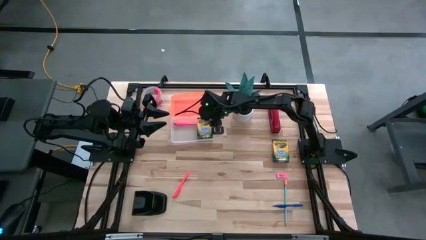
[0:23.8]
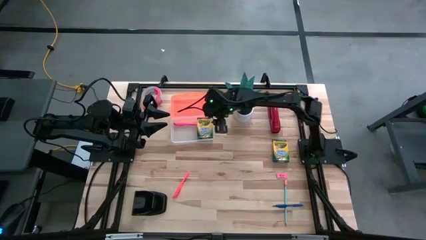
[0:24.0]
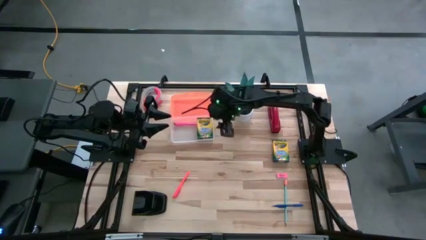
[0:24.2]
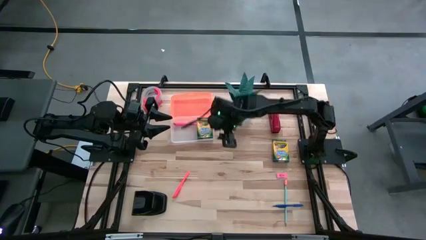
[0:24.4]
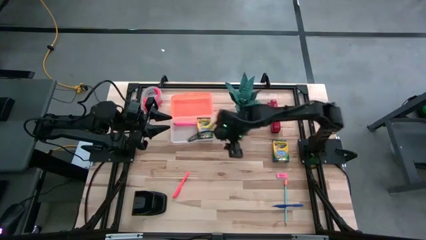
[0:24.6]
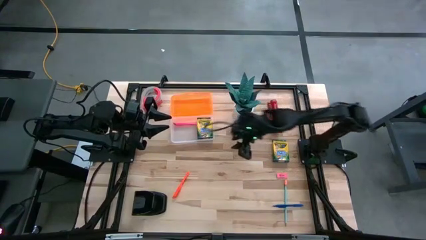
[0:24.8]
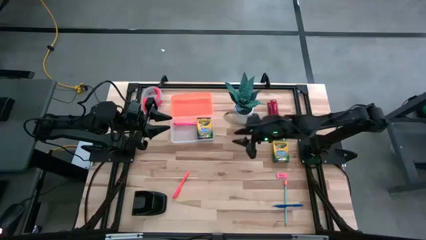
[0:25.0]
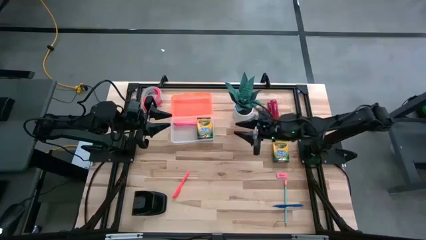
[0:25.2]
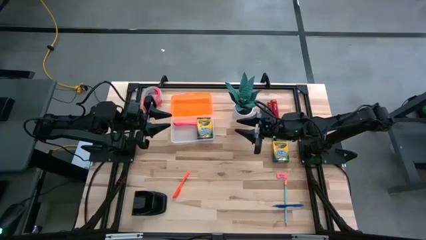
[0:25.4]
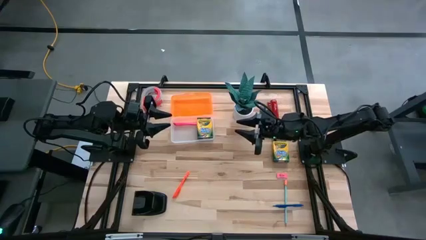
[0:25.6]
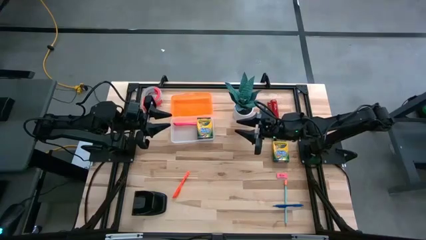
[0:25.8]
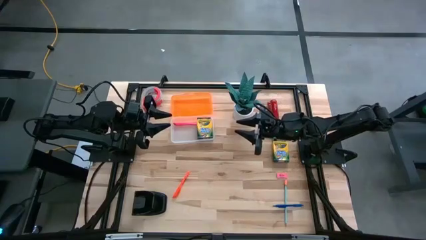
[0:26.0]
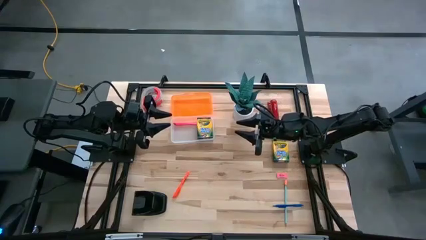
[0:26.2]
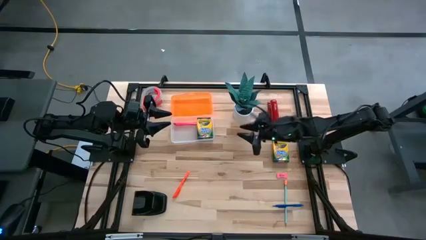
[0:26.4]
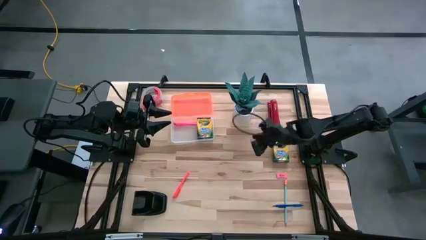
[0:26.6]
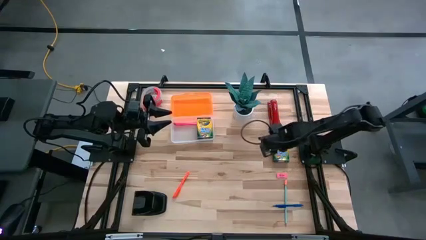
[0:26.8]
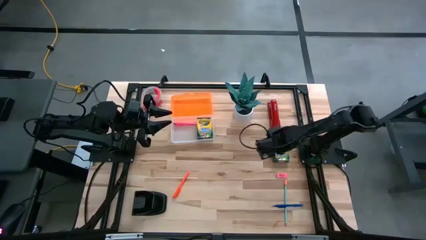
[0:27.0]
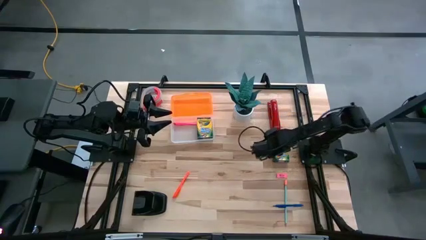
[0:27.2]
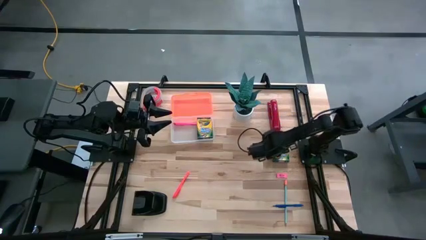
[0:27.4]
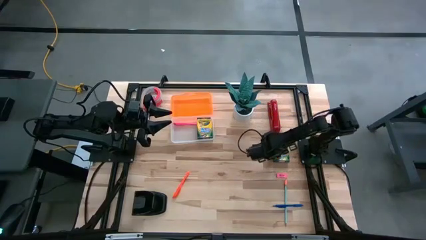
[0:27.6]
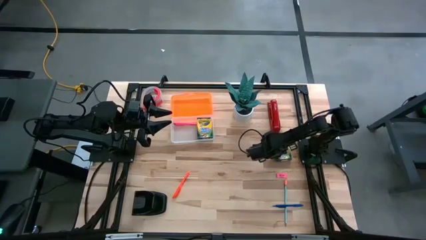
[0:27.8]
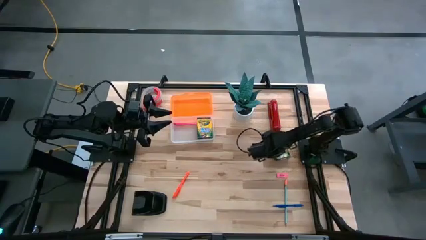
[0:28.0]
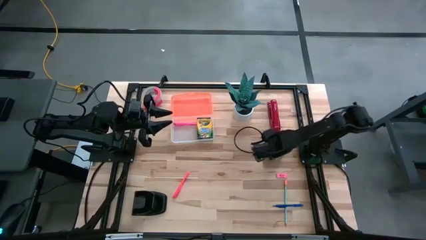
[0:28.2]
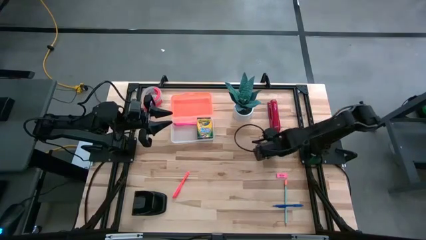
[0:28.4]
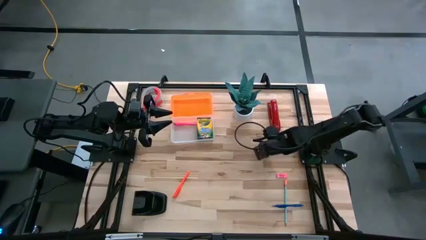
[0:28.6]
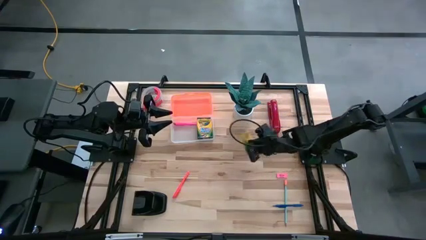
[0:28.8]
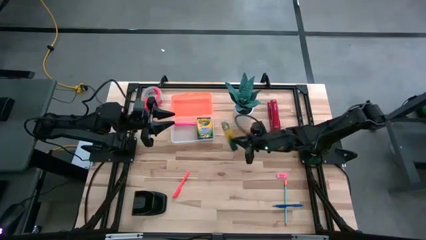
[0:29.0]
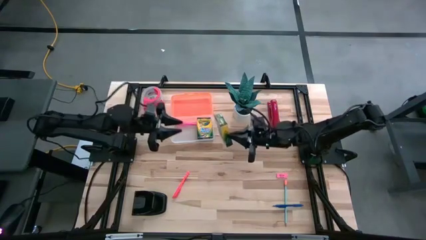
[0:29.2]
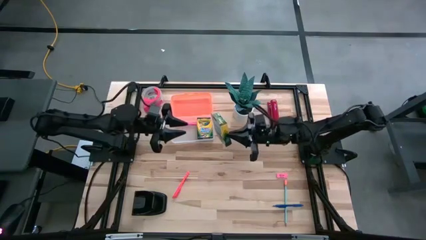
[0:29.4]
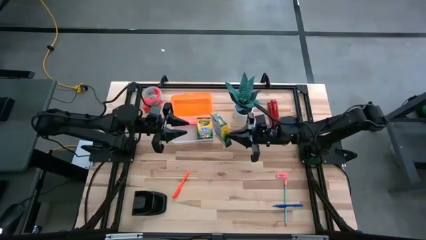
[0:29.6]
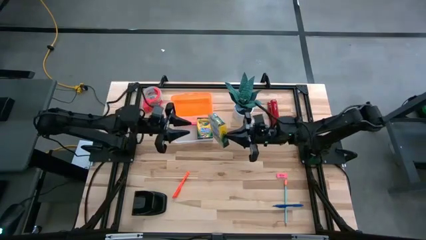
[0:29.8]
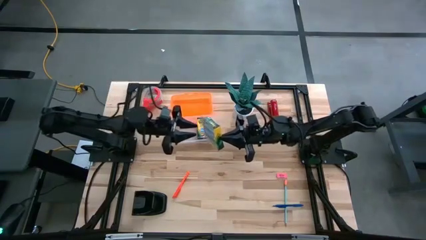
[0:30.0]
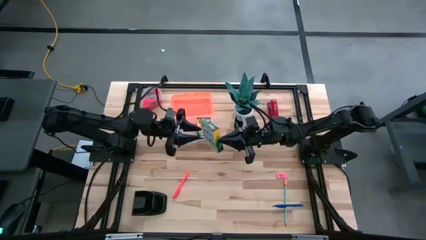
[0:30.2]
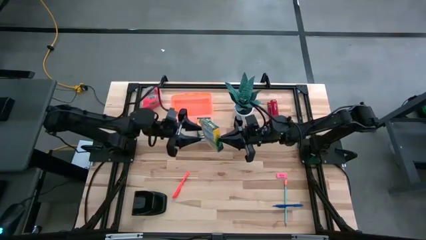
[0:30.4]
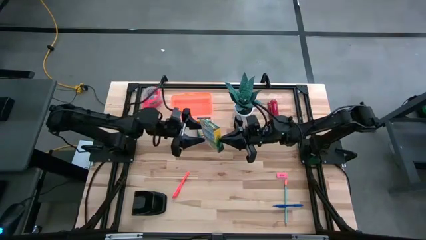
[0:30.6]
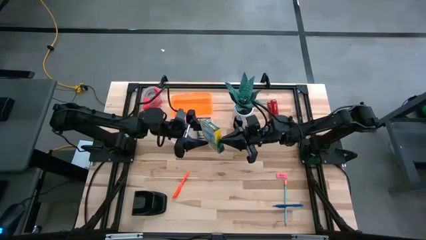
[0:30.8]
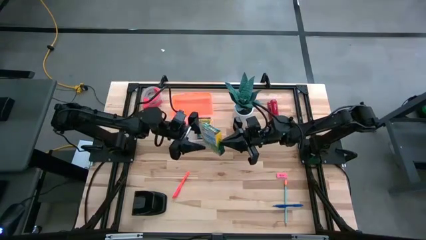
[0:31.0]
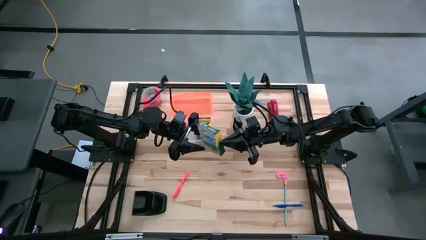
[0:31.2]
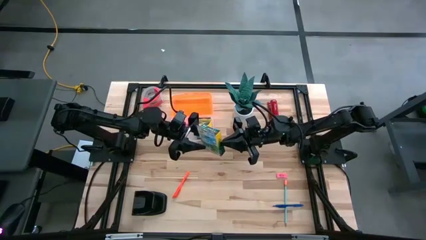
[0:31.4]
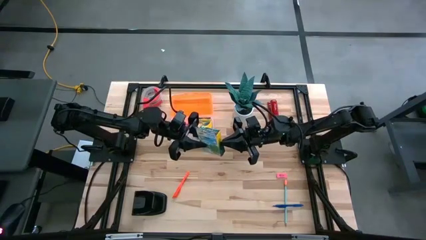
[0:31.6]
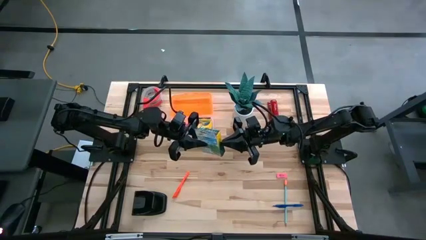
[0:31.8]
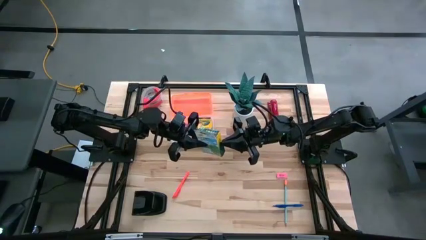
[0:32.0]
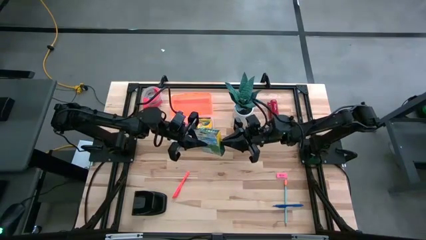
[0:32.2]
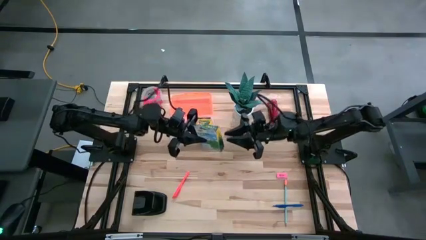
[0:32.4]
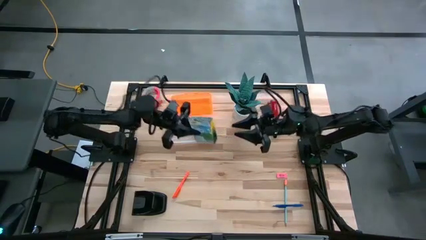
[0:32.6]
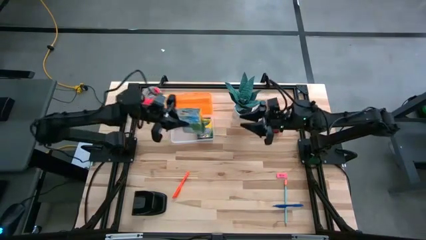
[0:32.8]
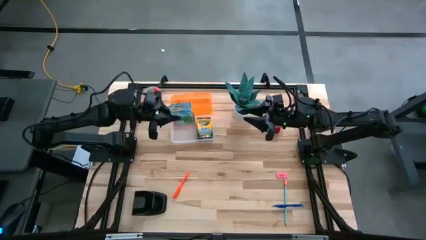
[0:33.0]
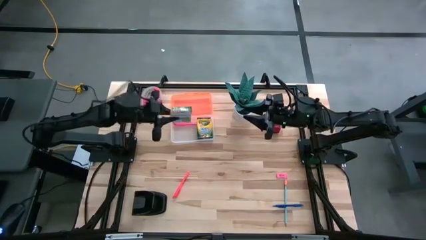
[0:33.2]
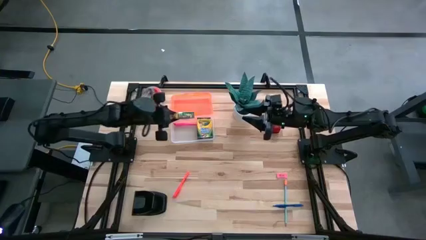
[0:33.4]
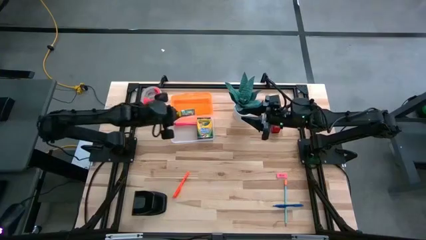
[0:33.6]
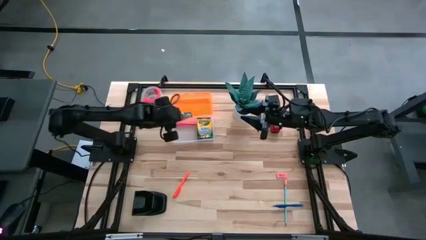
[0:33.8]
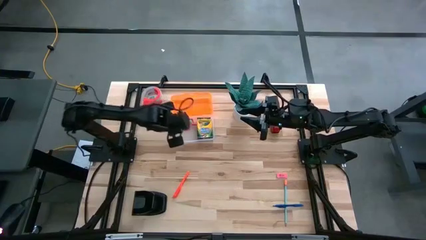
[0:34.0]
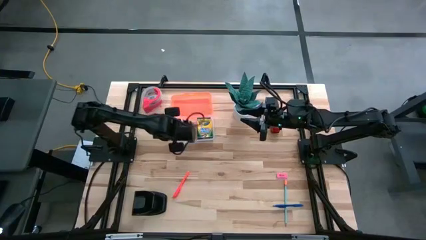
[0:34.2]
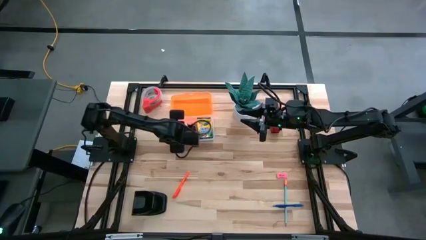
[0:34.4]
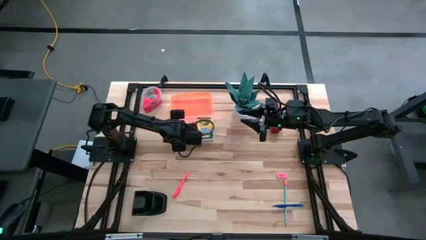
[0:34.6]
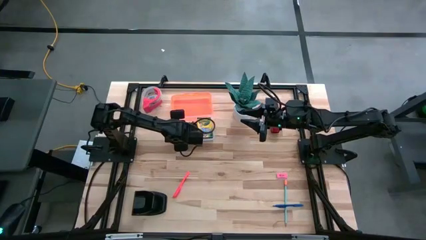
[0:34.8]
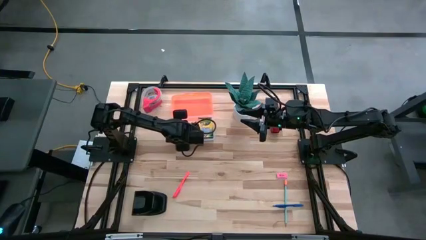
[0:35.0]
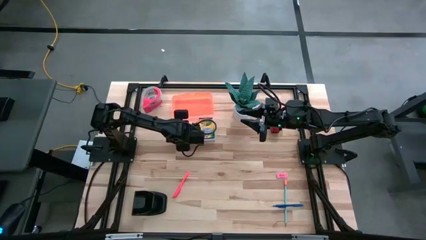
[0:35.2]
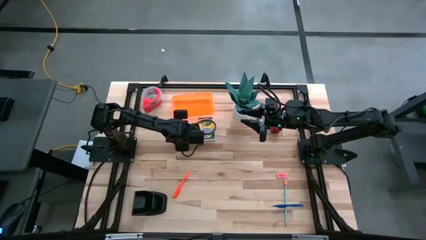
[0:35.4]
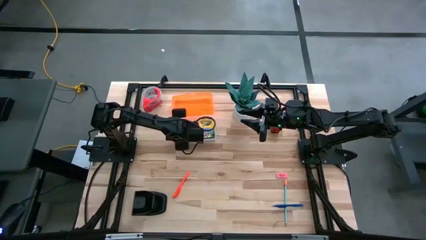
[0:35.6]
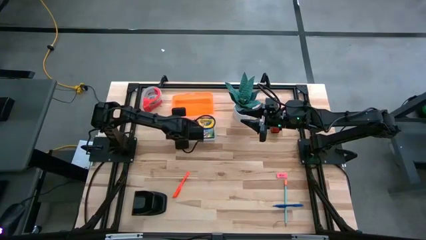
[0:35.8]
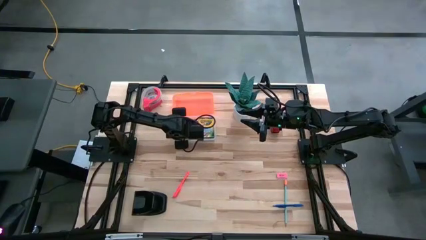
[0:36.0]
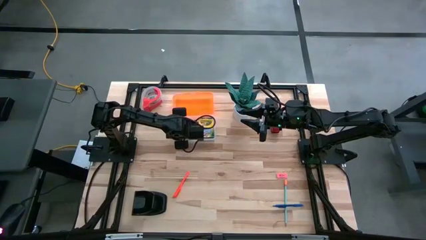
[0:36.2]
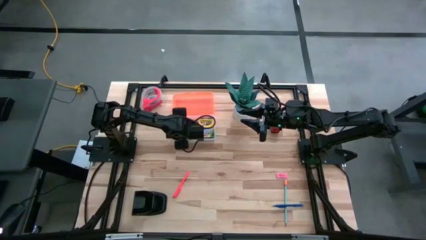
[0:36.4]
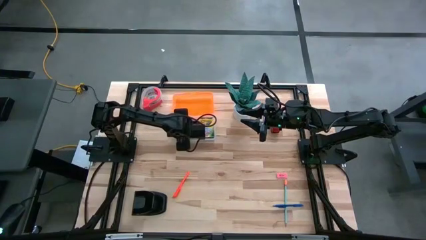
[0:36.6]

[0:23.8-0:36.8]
Task: Pack school essentials
Put the yellow crayon box into the orange supply box

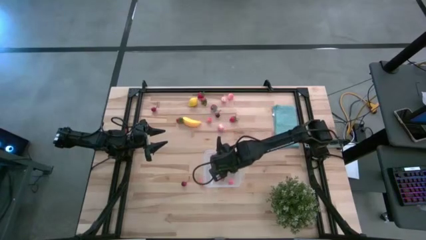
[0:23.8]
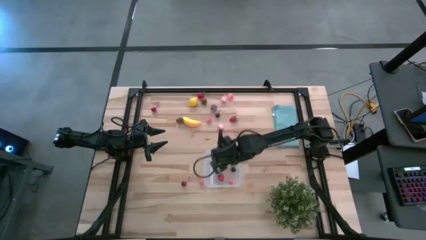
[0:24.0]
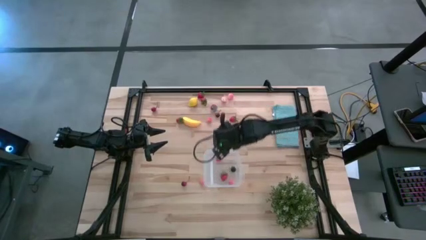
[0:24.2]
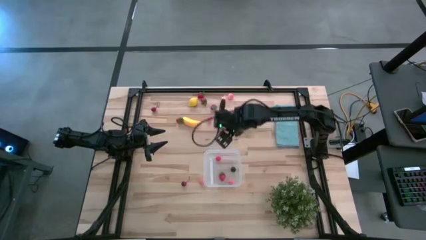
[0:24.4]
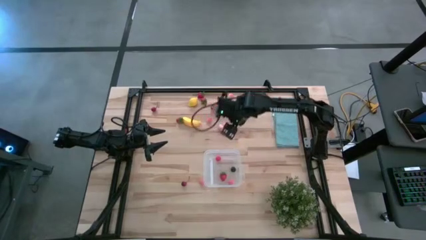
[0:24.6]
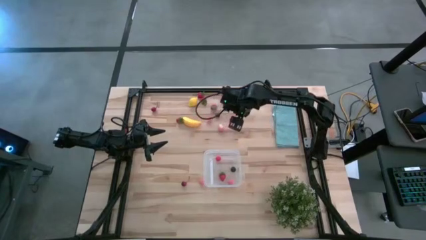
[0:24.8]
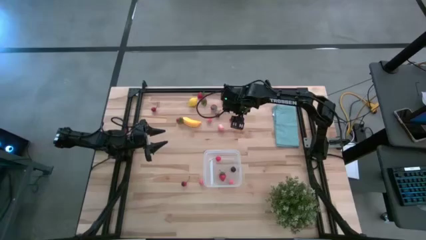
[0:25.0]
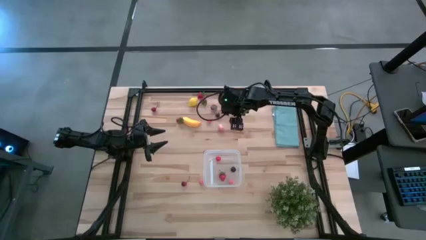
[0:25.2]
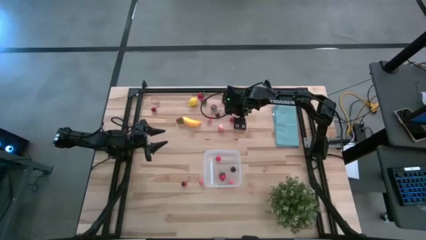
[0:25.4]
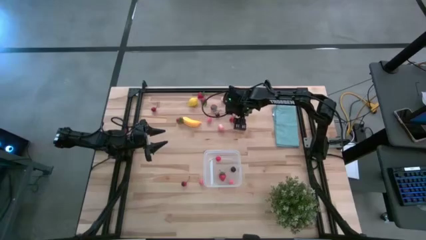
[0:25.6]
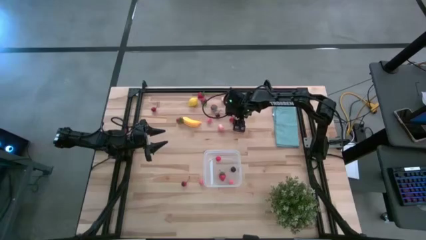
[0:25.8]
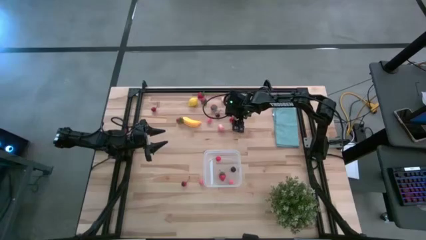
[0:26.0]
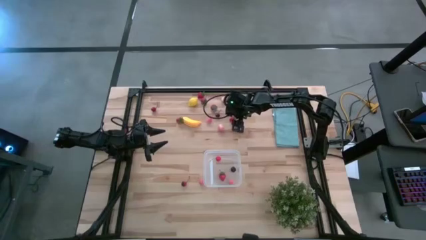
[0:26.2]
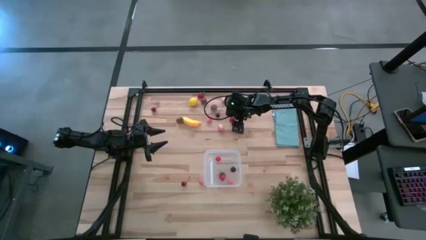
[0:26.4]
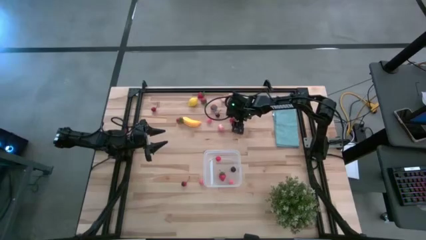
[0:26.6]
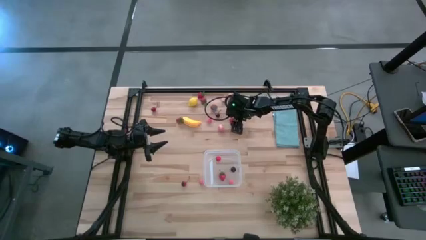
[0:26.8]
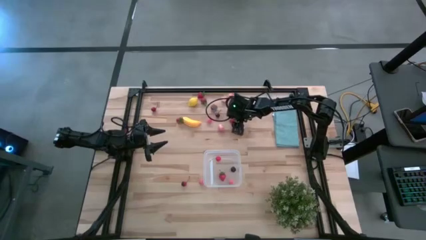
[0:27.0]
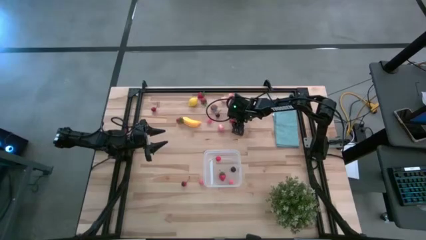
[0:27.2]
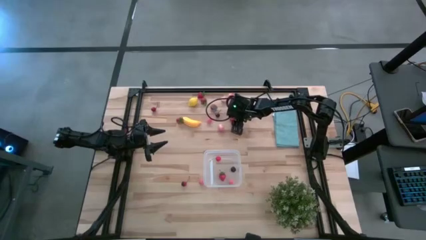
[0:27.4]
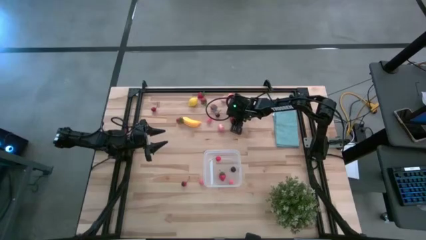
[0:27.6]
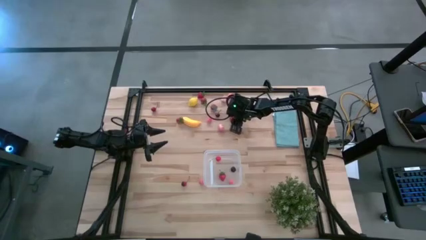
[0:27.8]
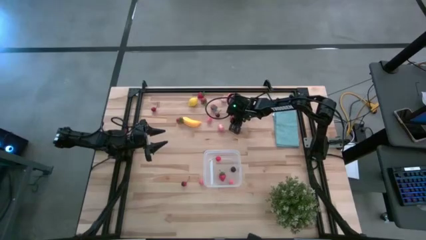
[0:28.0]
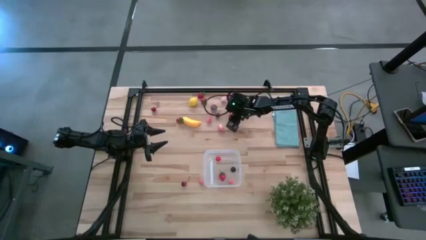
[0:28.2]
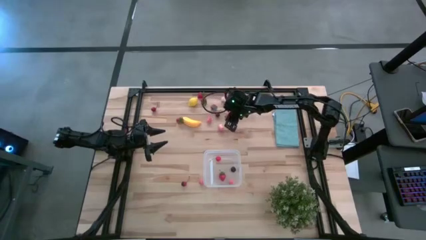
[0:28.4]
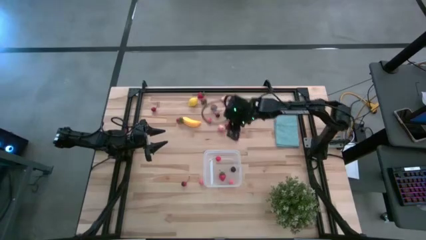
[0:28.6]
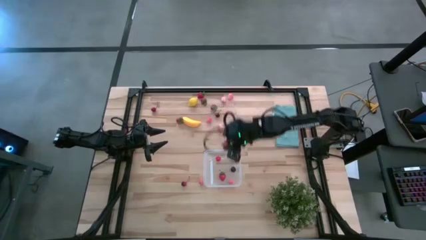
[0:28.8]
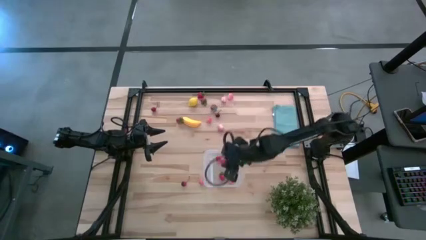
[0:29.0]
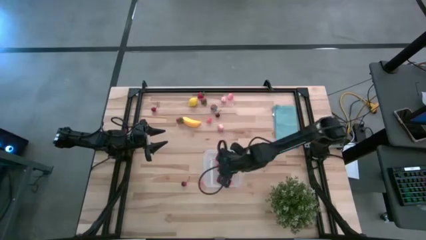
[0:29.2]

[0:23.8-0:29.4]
Task: Pick and placing Produce into tupperware
Put the red strawberry into the transparent bin
